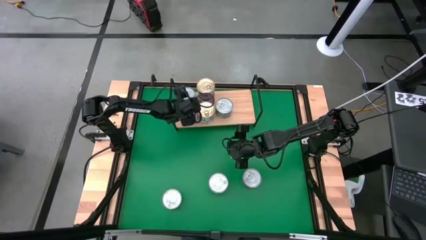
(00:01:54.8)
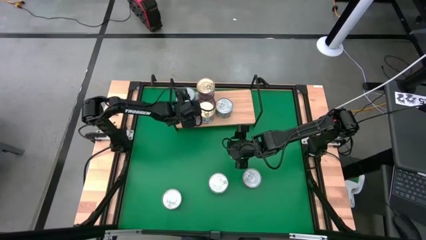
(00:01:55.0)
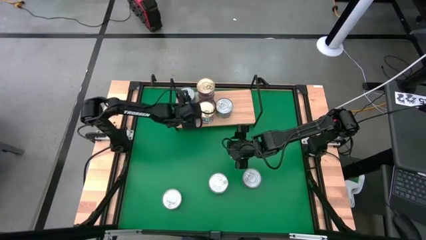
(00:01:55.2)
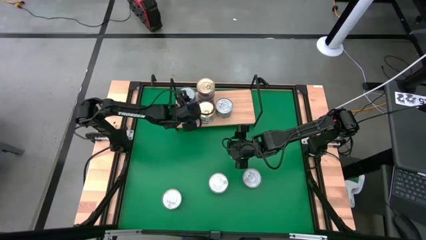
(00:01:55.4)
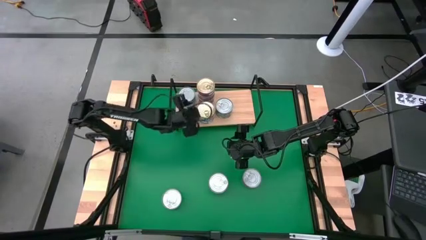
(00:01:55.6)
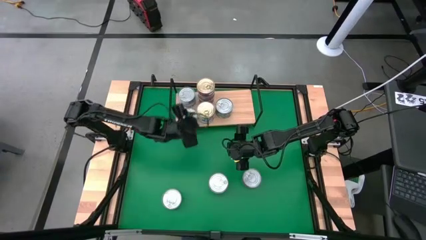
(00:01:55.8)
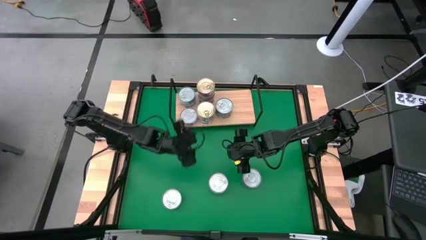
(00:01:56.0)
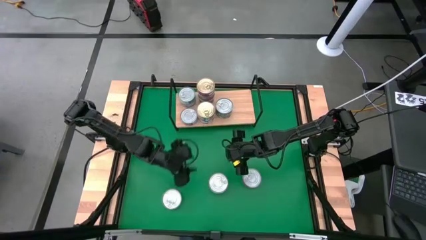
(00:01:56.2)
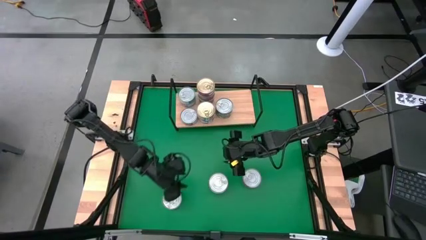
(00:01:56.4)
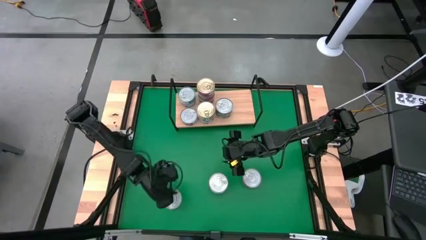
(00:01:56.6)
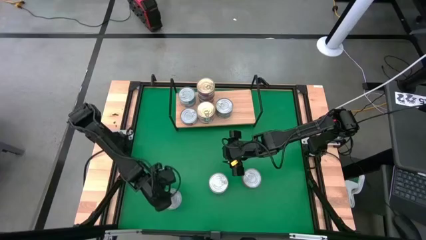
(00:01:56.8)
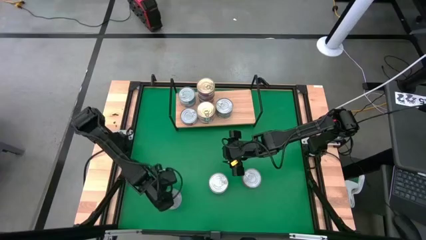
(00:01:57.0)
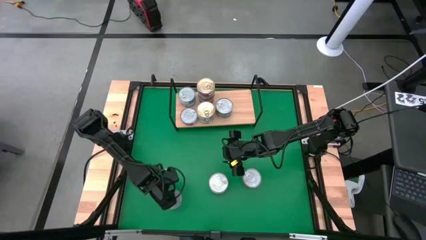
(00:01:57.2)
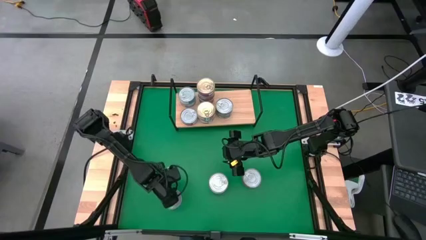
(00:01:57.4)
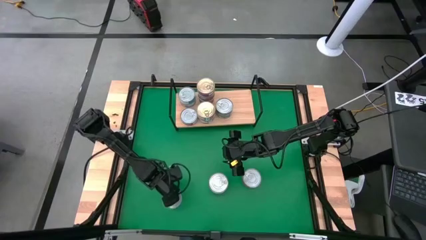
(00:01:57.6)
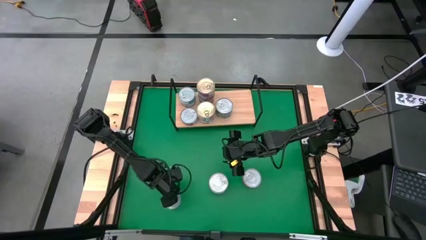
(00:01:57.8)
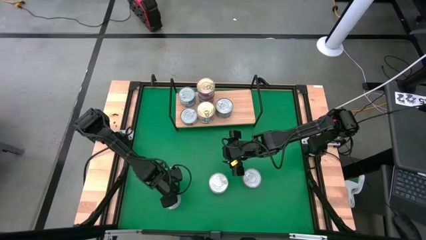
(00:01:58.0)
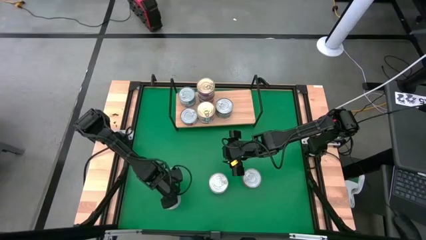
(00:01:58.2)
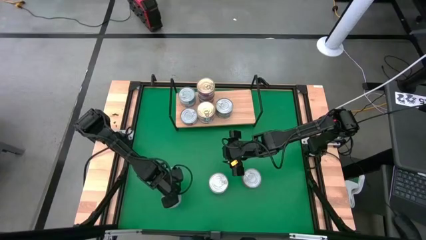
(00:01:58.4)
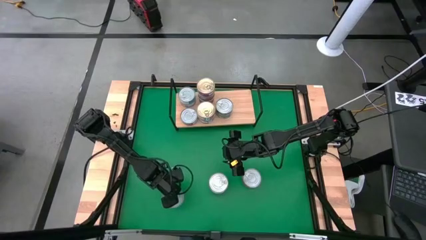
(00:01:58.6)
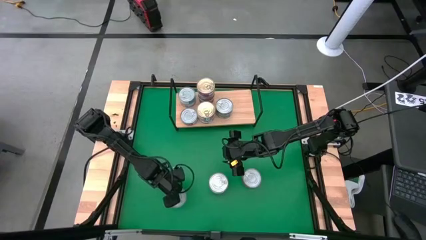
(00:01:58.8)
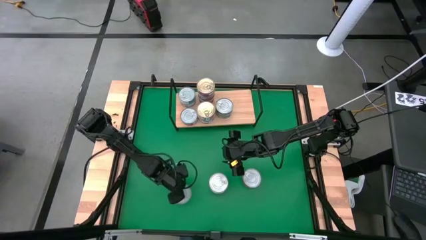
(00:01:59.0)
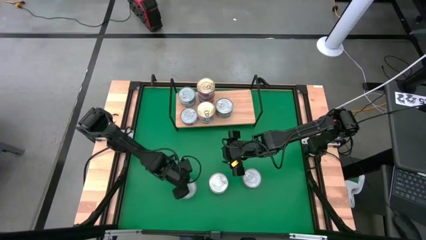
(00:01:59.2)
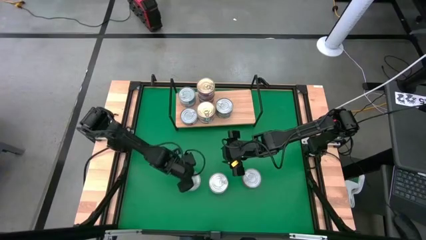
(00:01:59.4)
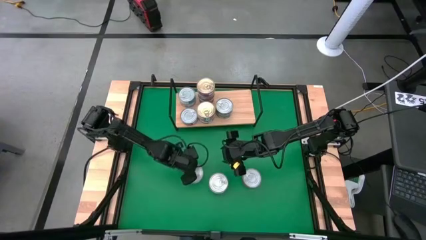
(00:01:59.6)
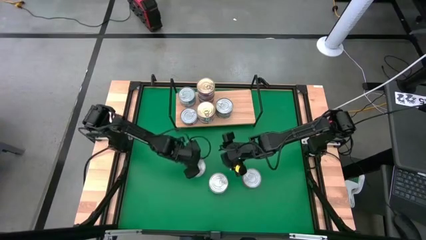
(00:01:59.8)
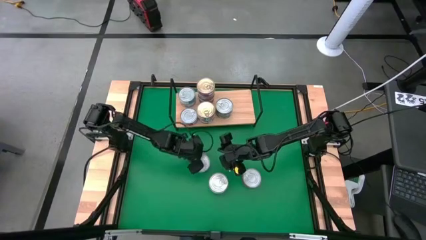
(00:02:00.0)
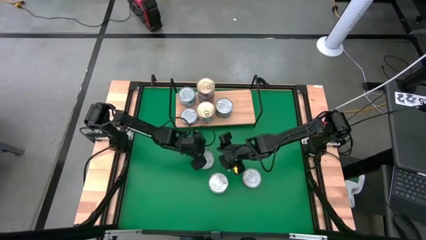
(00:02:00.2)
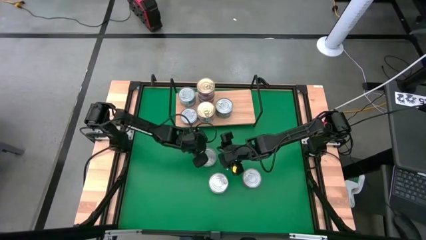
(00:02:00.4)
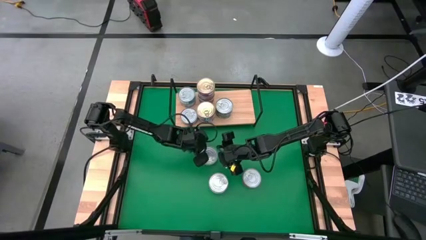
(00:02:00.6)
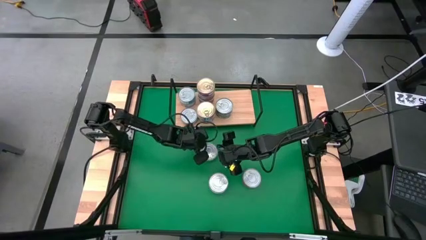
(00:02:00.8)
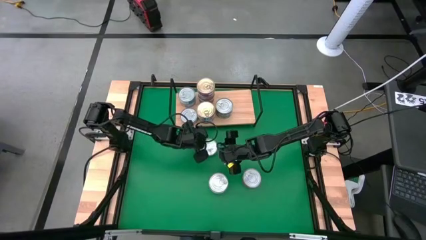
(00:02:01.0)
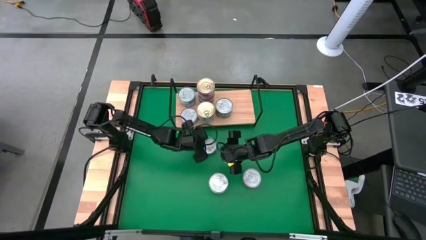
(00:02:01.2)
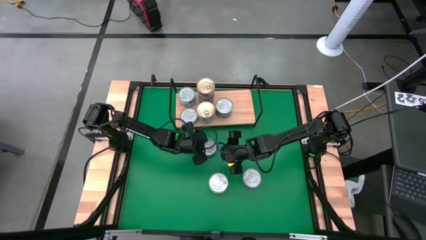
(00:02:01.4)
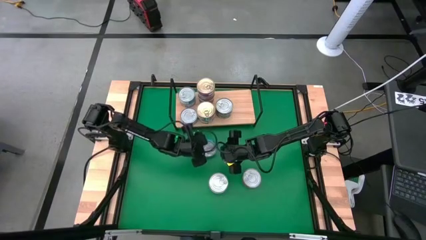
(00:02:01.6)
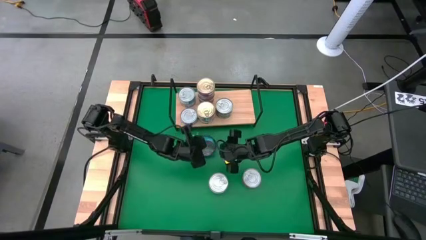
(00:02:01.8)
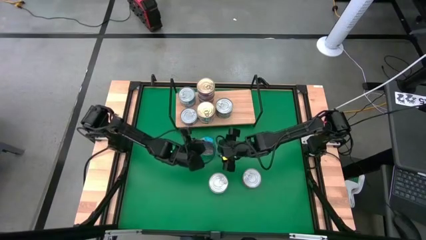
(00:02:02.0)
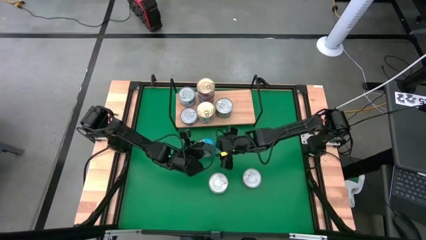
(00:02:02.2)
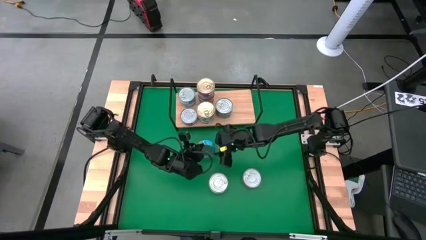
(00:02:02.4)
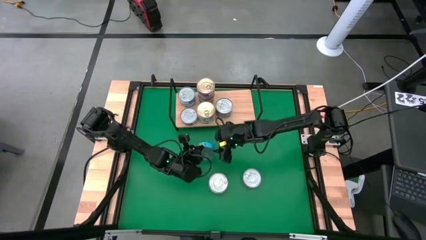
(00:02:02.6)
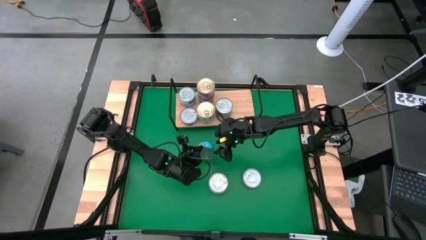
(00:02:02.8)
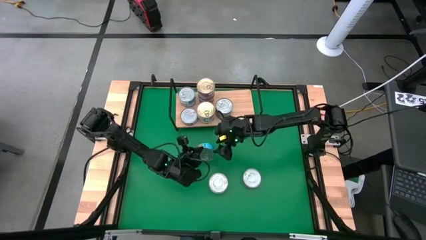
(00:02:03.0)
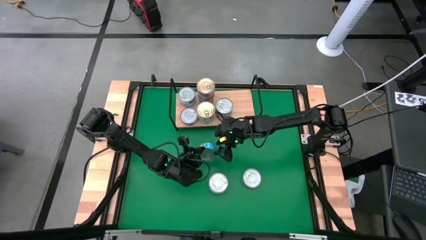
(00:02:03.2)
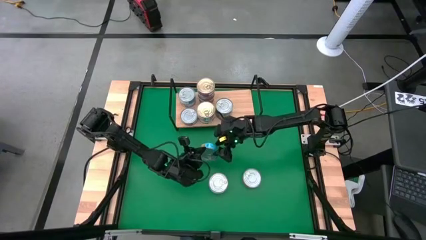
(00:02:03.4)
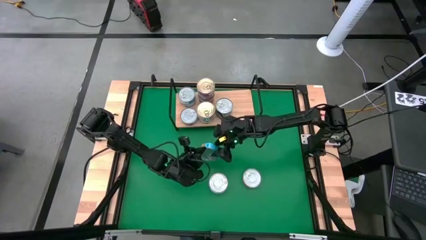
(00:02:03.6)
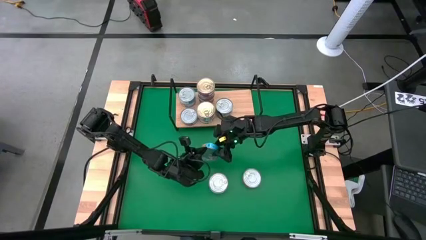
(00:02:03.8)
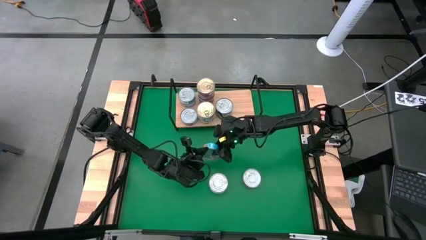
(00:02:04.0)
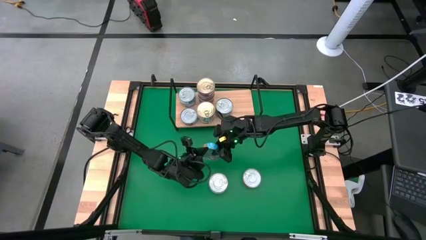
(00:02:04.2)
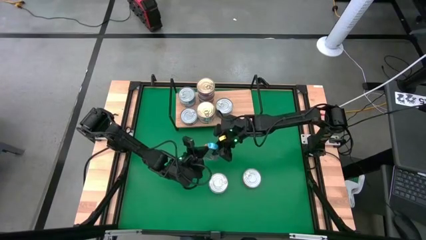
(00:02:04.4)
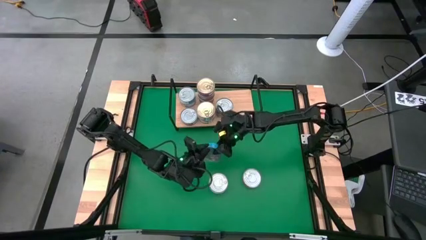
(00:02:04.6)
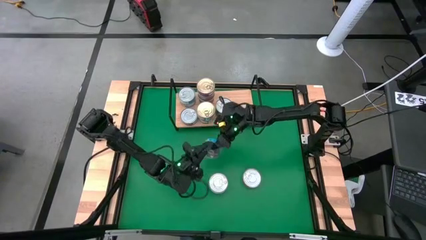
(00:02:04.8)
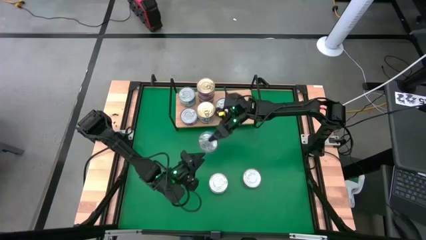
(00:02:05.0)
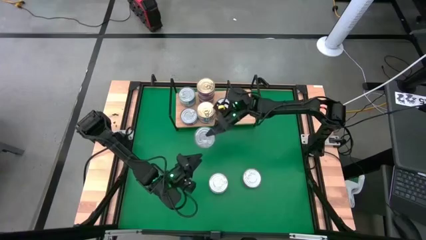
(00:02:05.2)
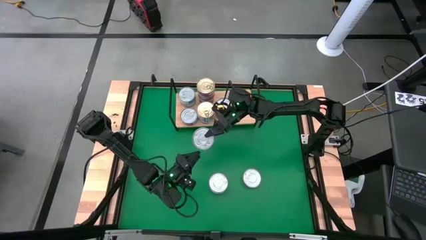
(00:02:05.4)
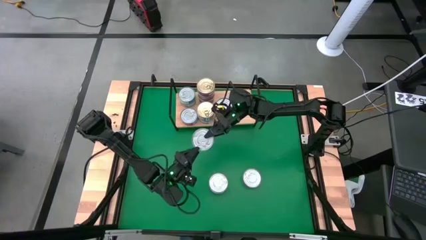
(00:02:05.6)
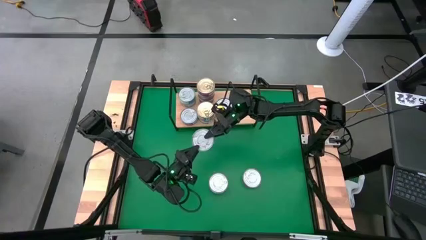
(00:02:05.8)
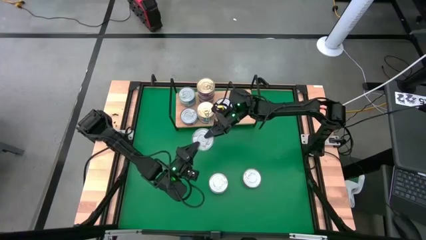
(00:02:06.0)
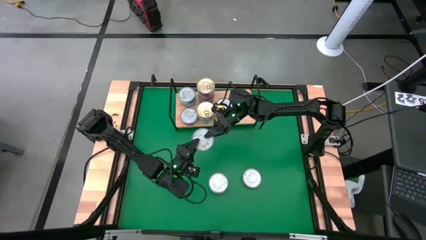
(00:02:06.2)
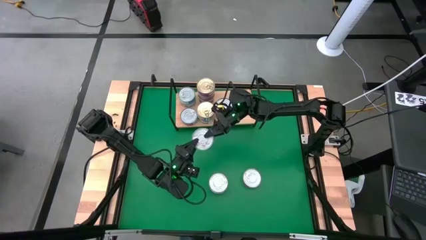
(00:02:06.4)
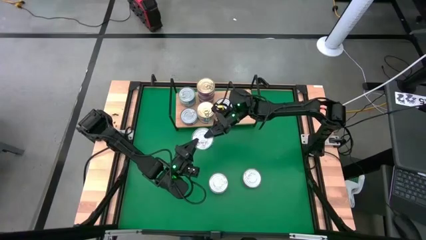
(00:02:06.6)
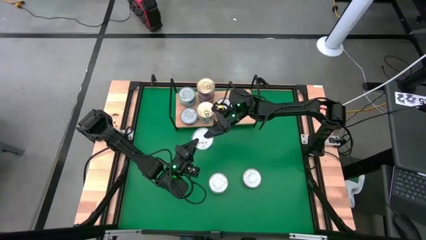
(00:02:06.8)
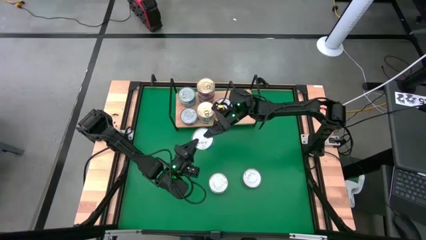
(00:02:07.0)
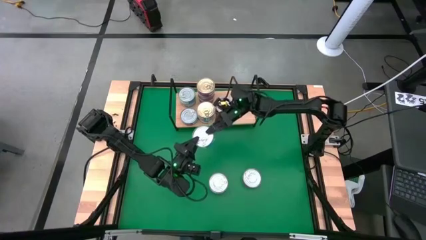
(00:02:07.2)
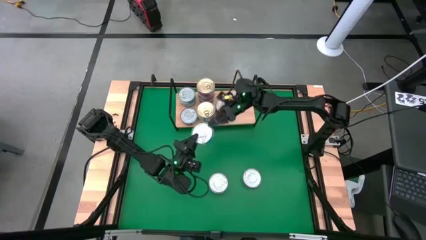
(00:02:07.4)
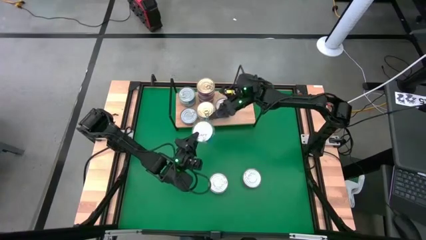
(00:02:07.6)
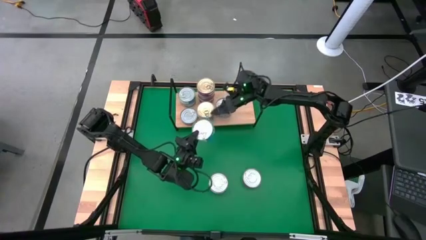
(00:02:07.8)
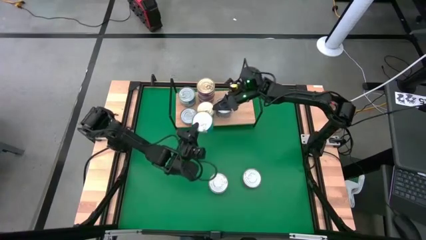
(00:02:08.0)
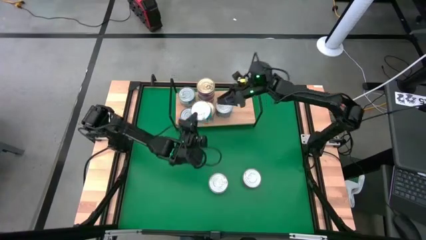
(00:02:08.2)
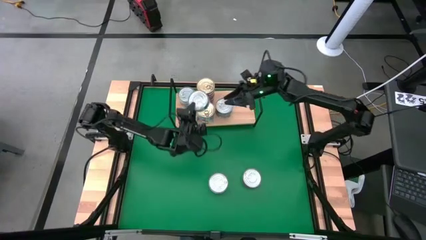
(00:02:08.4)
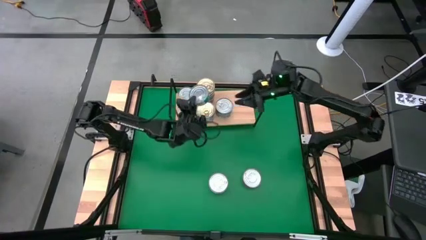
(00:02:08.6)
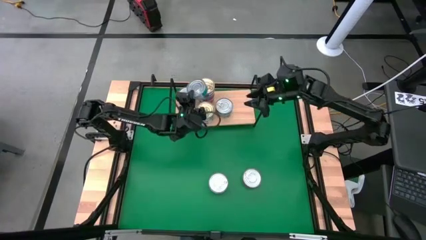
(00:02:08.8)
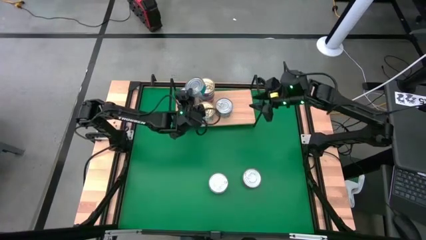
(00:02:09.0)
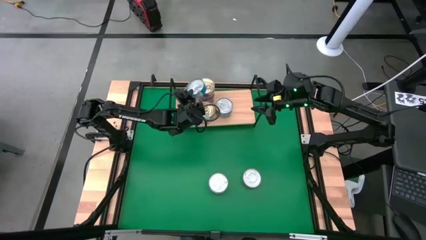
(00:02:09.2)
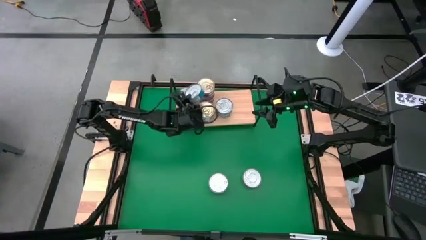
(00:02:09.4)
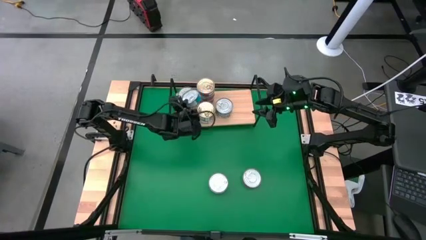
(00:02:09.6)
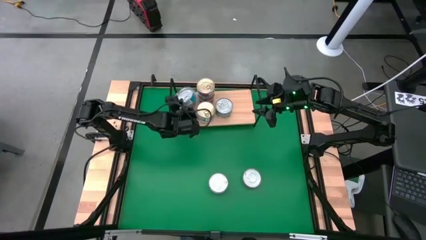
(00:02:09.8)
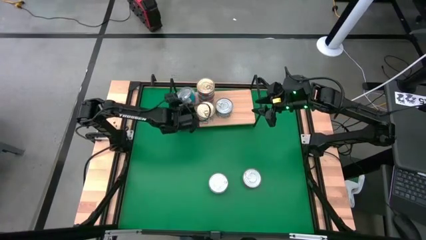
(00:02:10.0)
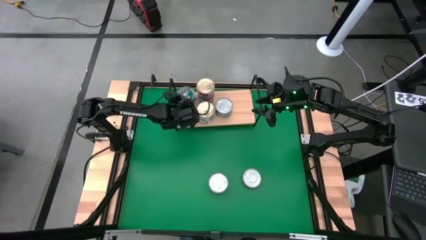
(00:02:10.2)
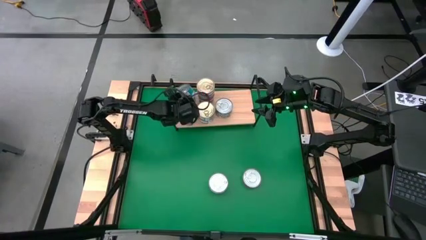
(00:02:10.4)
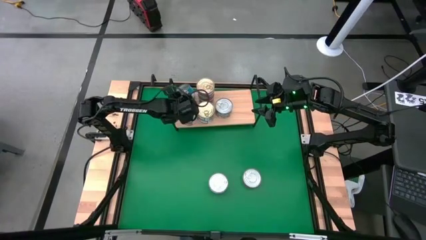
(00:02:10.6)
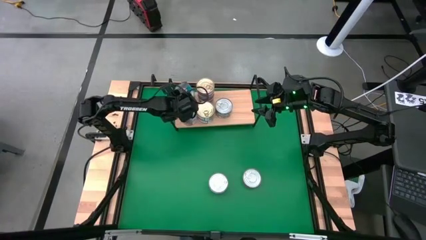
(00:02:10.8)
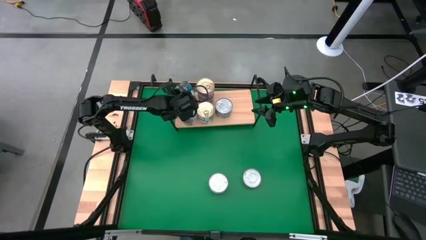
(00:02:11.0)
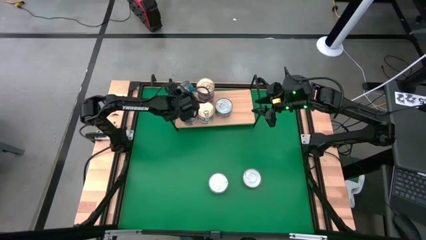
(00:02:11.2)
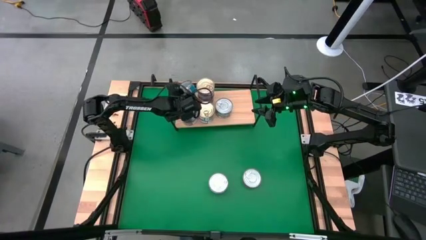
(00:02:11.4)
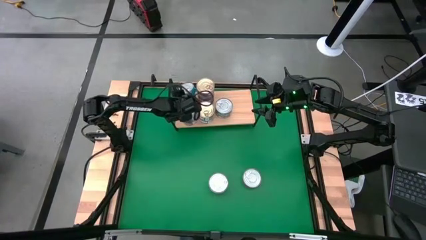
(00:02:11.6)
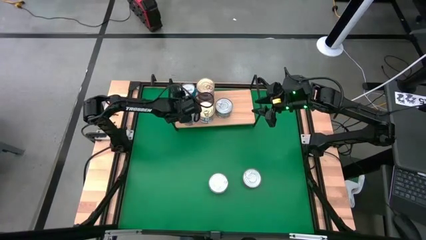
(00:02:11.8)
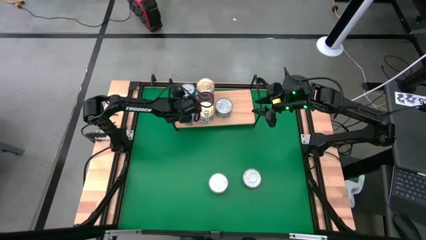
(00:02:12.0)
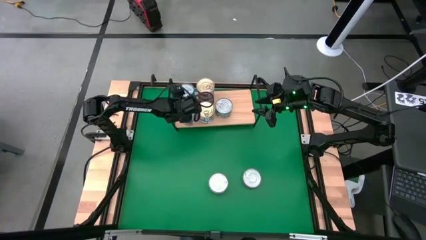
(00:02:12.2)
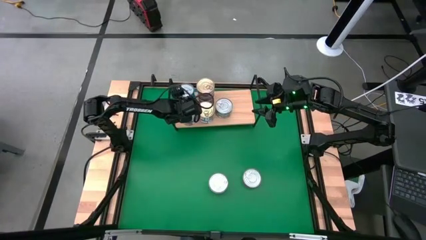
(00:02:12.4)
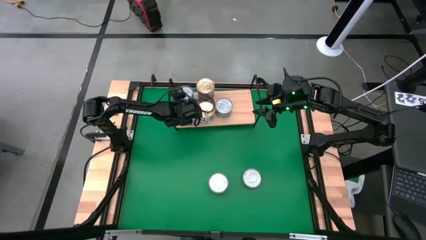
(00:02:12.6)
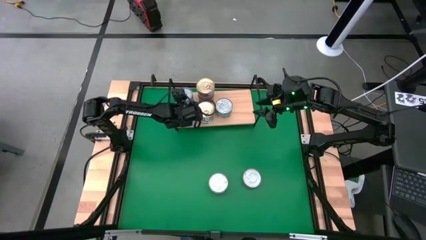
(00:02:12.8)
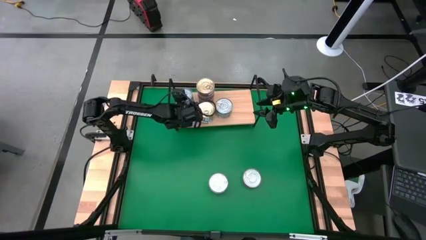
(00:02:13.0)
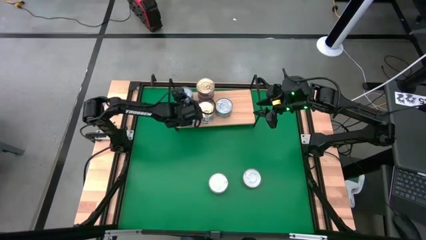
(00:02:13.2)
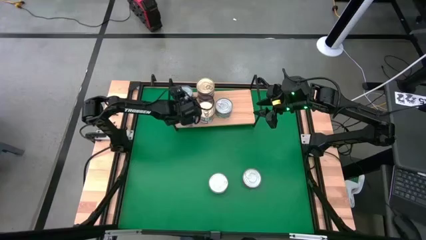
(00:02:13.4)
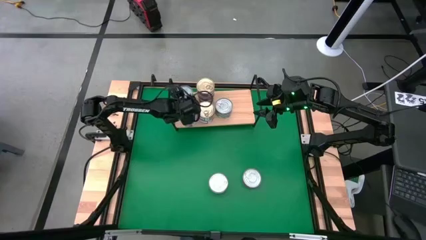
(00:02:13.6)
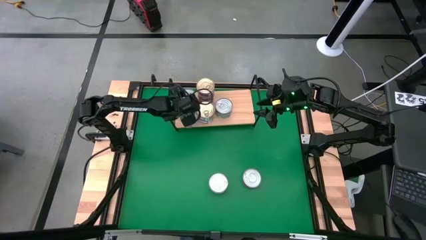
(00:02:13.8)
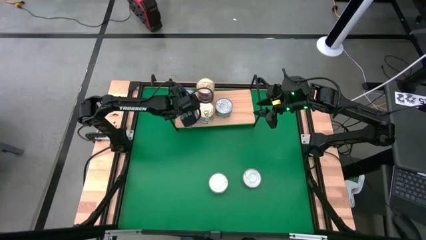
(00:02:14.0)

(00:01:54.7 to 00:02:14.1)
Task: Stack canned seafood by type on shelf
Stack the yellow-blue tuna can on top of the yellow-blue tuna can on the shelf
